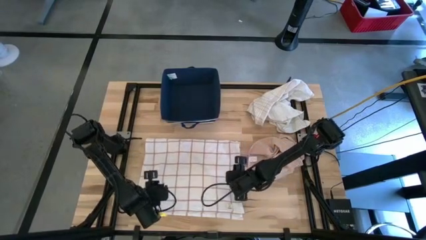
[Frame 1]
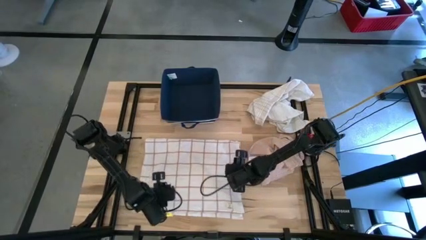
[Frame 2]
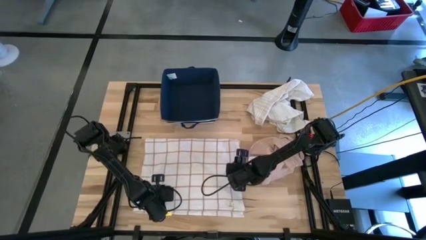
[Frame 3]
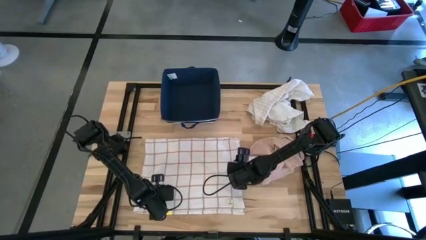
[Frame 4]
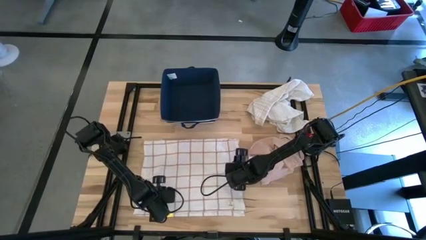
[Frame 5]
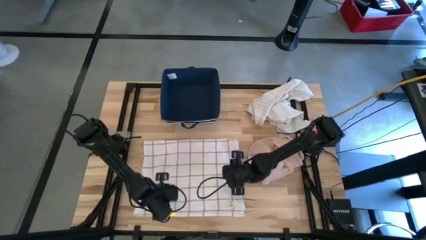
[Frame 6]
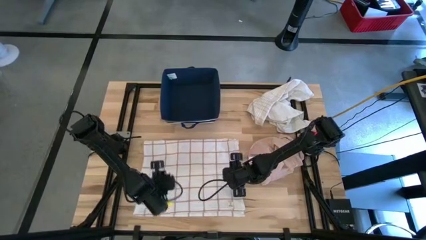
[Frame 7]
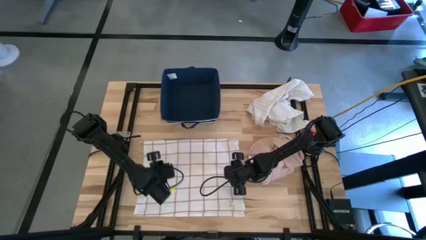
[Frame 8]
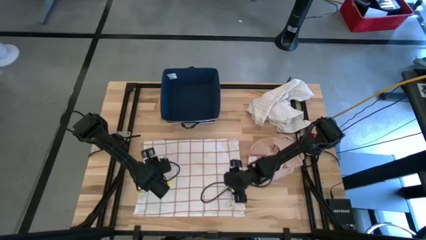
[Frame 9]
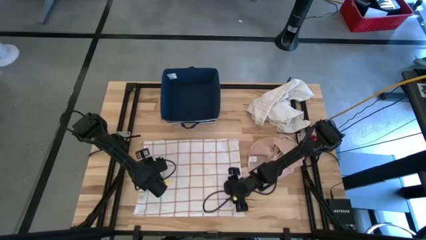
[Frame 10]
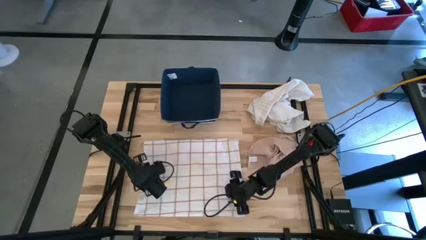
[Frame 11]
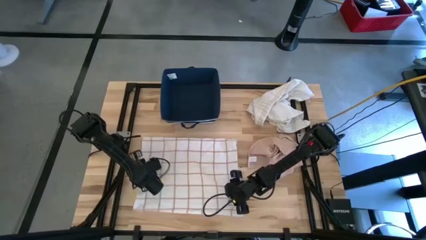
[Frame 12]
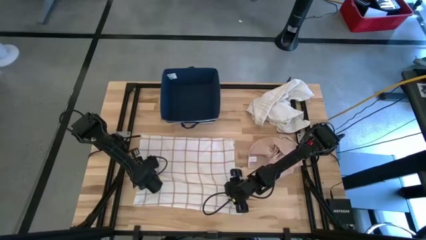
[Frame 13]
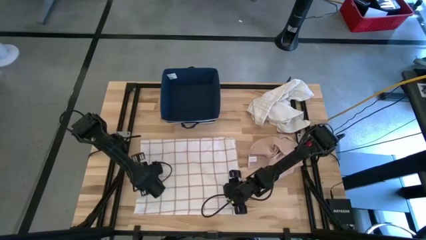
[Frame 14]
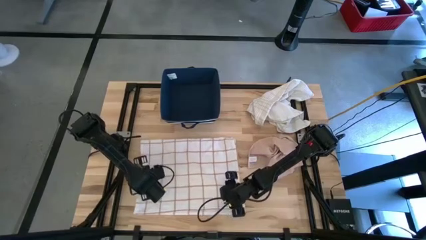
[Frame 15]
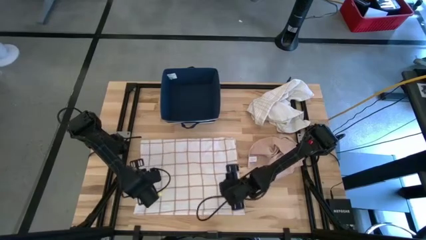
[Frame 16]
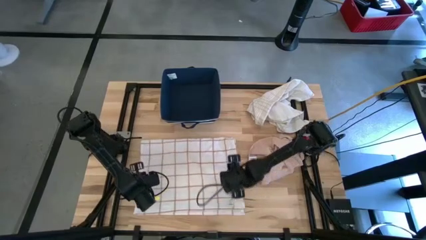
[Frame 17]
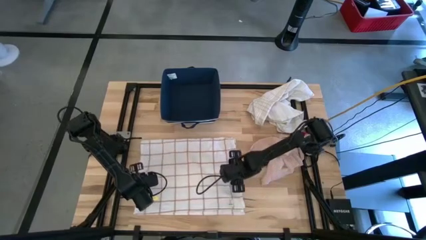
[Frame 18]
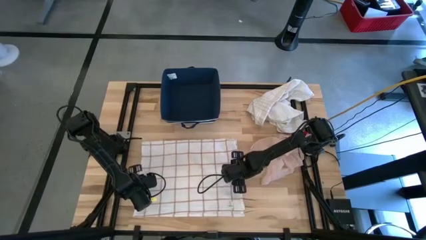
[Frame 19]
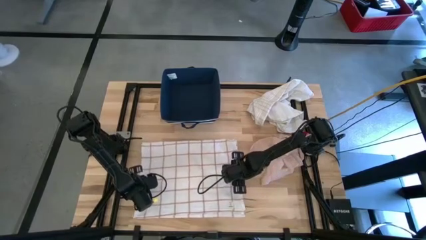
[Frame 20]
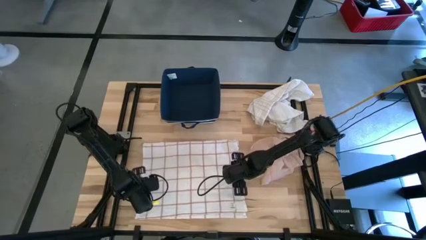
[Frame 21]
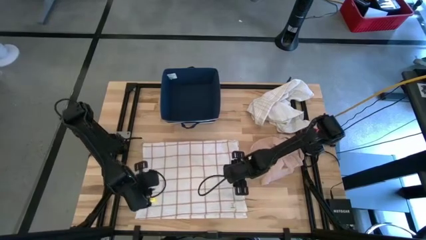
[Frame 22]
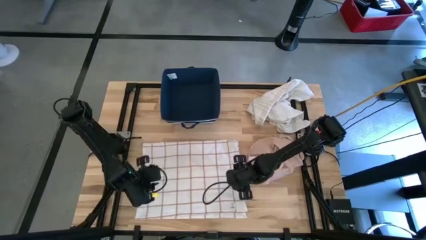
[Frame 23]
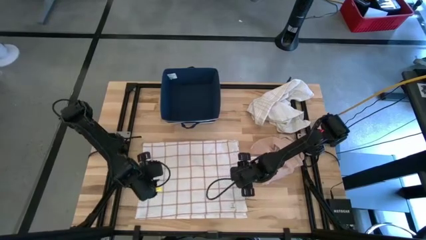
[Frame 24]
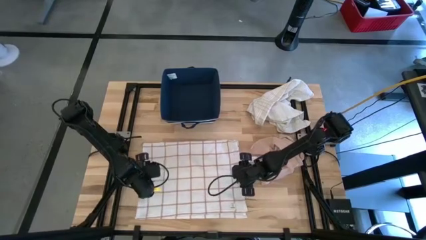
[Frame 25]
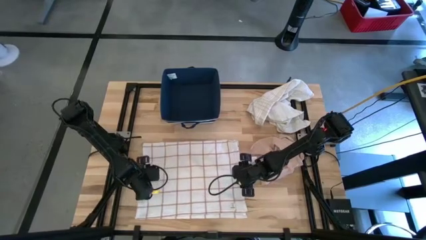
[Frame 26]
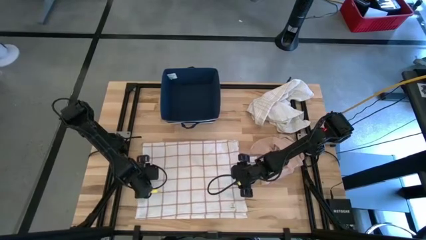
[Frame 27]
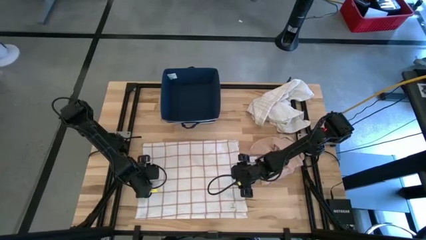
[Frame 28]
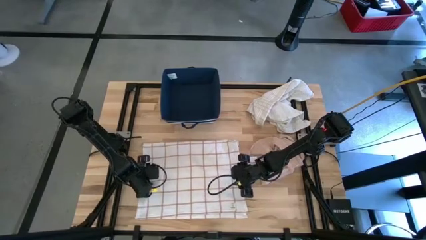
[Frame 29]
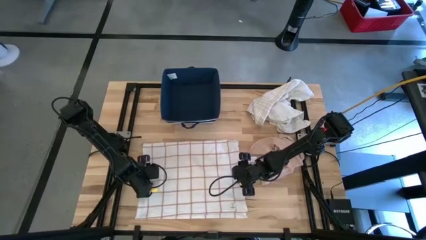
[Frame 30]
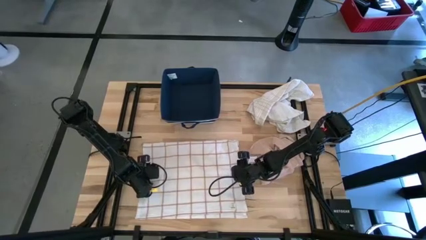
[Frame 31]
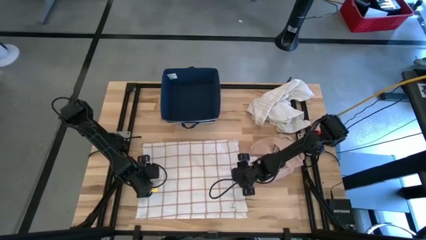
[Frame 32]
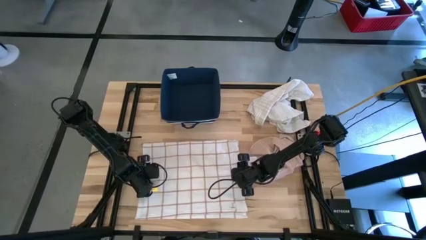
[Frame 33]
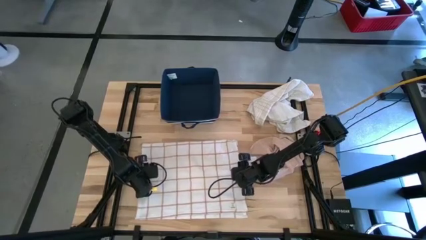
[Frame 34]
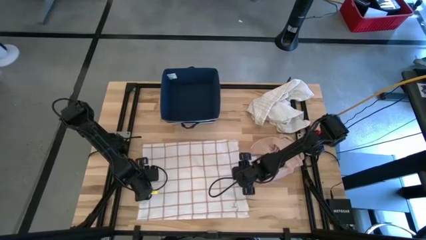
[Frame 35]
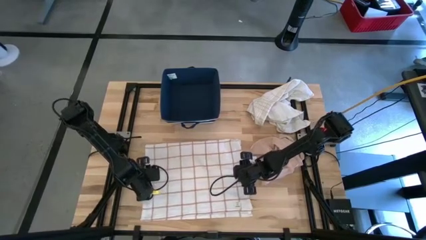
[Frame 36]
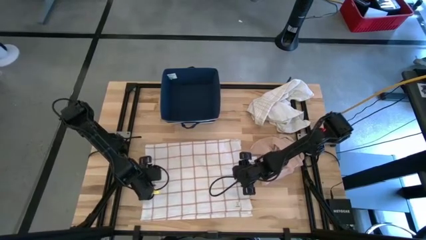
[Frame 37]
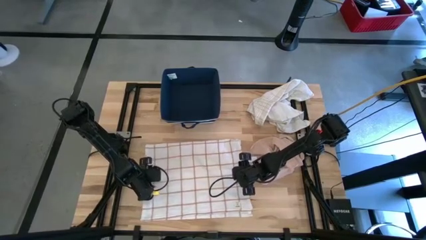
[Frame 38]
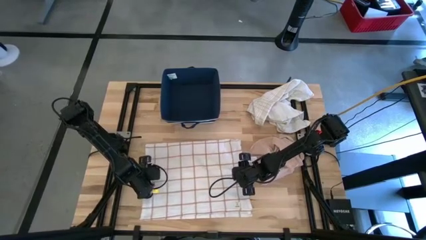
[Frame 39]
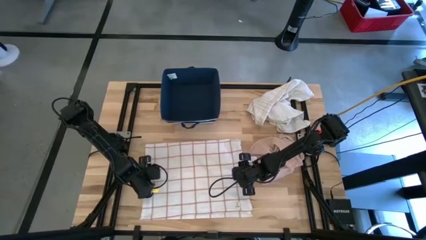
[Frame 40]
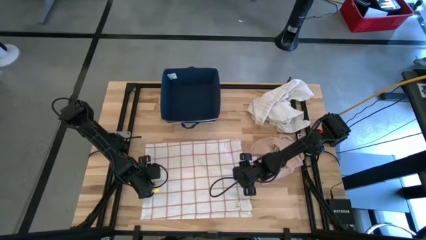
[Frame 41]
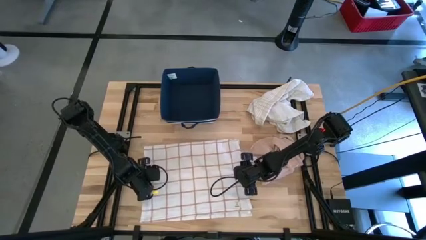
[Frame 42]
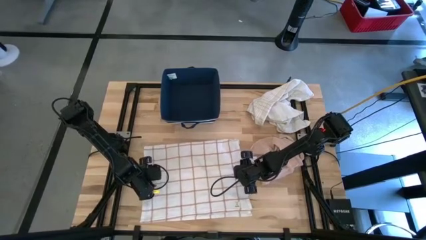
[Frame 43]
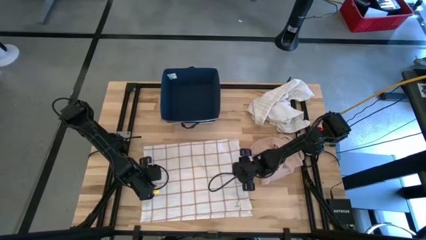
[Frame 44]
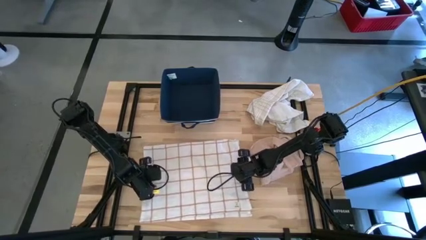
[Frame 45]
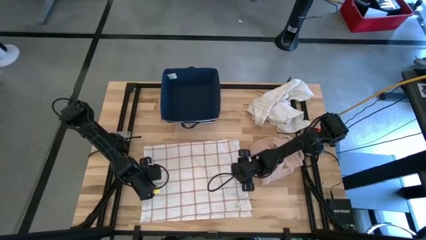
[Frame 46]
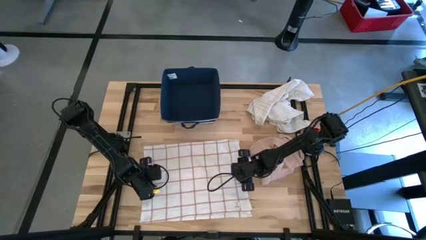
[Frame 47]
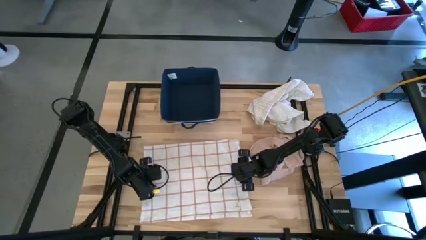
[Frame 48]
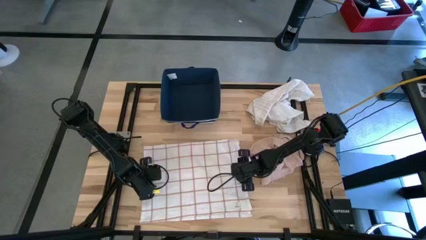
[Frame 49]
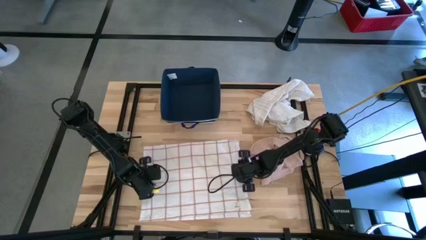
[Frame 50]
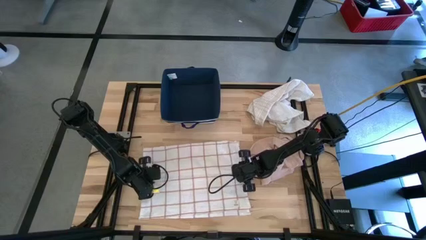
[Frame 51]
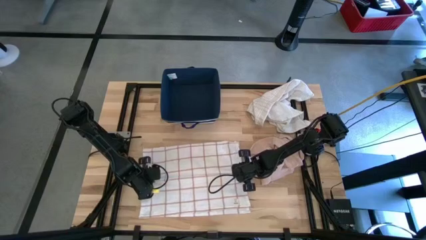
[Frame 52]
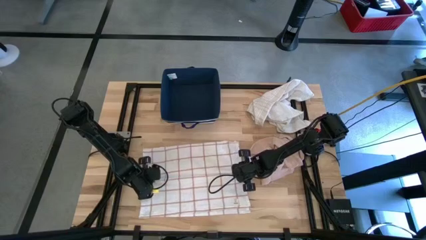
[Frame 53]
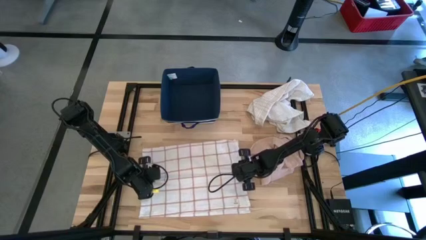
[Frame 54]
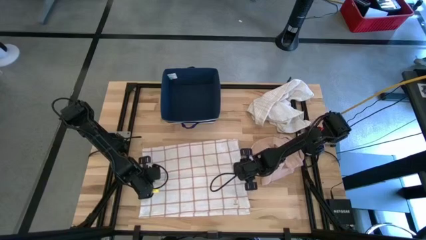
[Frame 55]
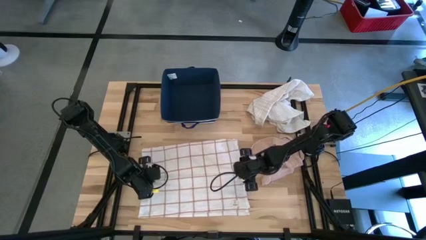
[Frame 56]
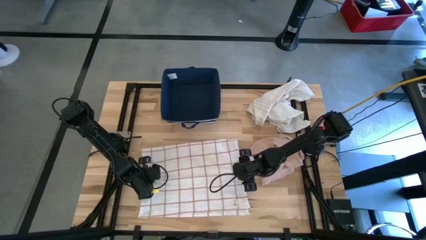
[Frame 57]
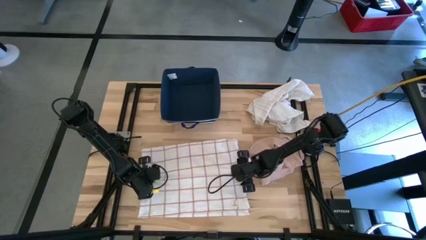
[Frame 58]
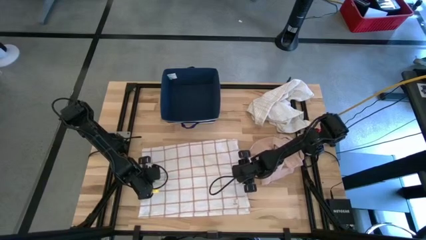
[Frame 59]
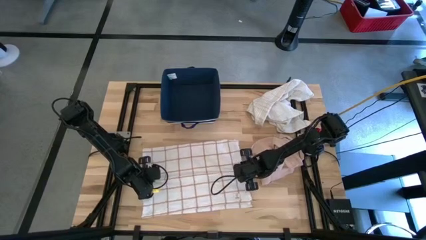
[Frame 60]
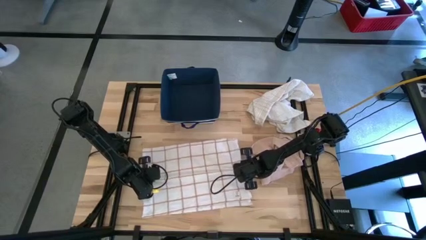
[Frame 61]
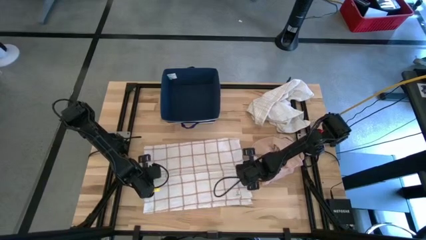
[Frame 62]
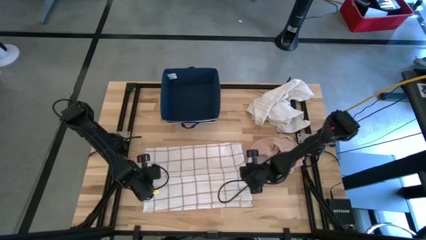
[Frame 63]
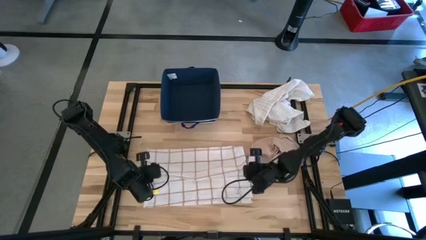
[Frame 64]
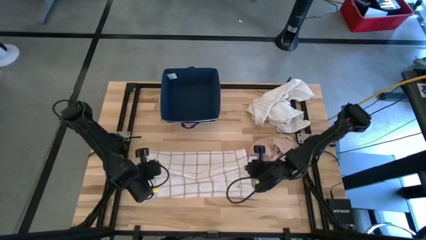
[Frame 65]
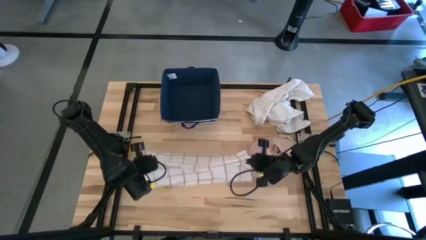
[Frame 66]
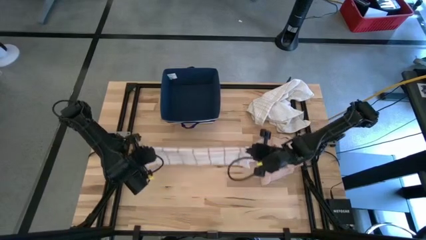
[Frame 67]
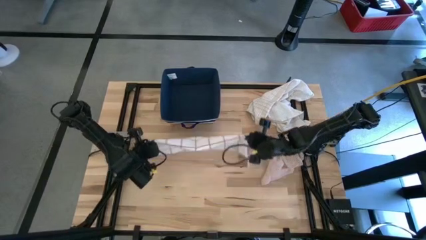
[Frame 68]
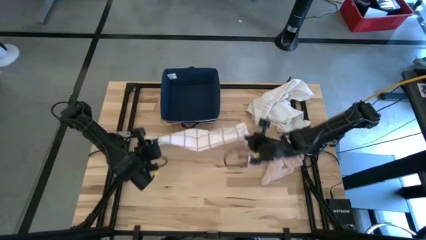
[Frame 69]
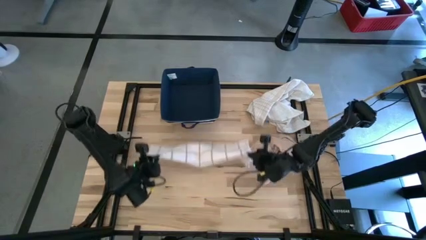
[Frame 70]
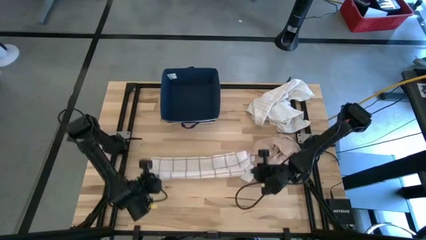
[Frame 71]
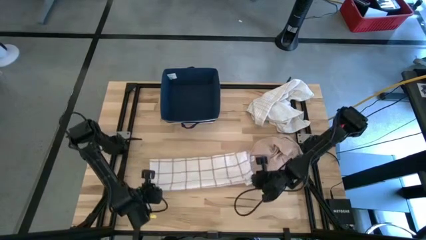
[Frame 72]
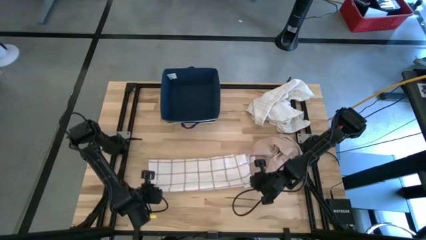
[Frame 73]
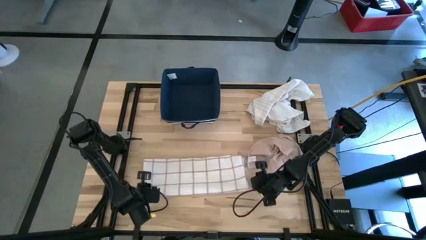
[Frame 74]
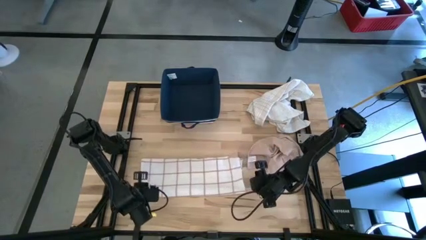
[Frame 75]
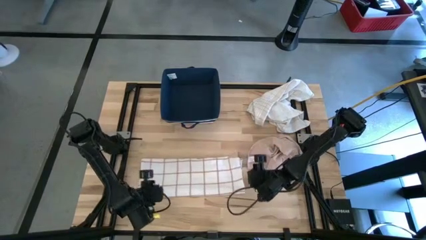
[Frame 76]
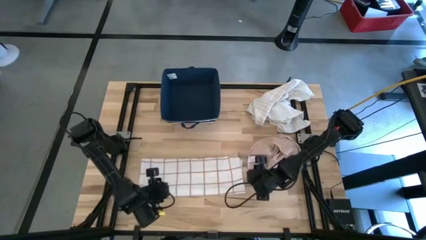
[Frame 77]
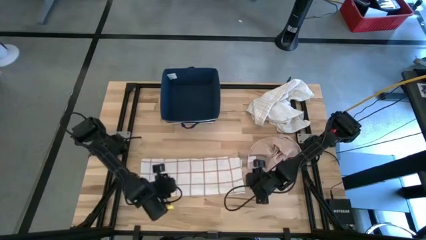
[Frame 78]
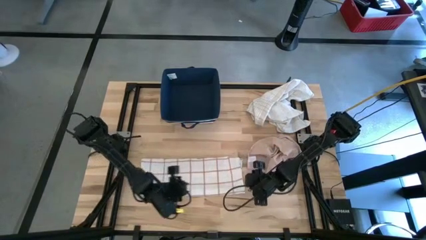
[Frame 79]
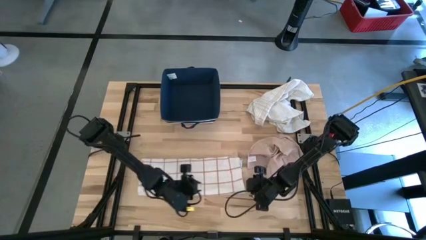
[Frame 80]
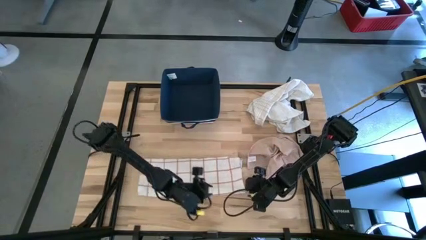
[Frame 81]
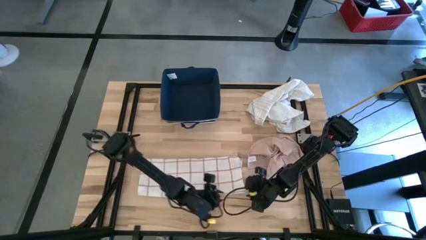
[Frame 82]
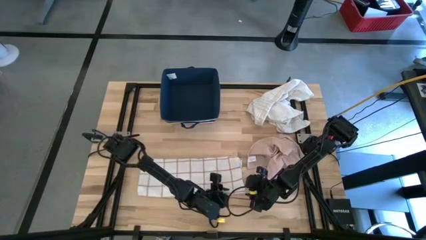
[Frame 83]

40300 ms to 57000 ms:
Task: Fold towel
Fold the left white patterned towel
